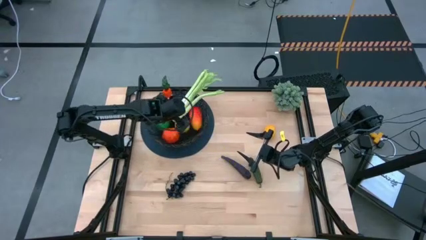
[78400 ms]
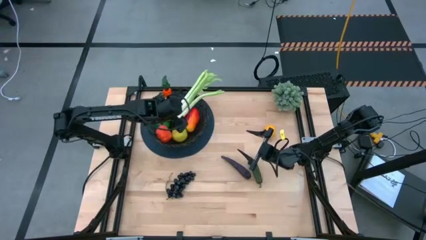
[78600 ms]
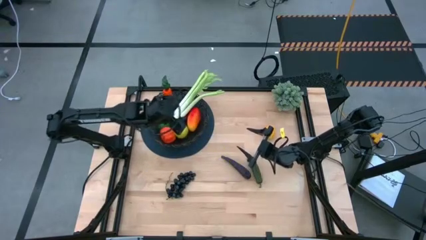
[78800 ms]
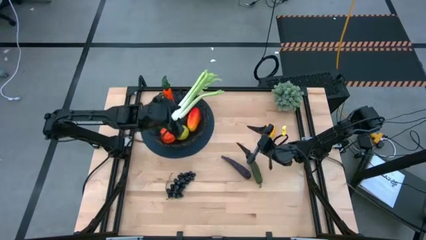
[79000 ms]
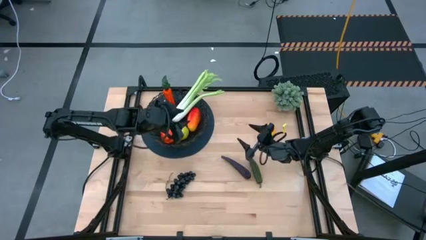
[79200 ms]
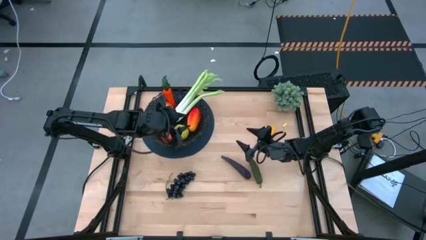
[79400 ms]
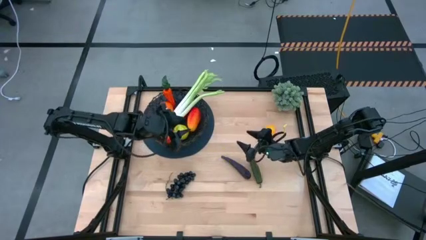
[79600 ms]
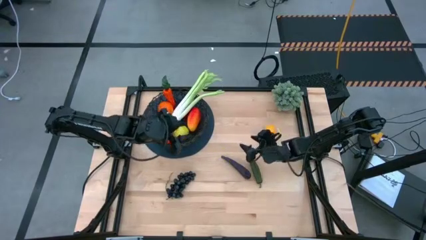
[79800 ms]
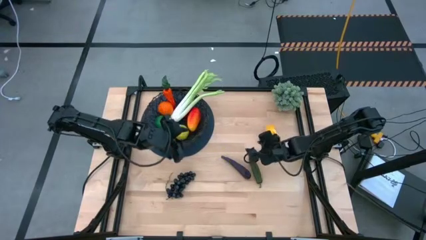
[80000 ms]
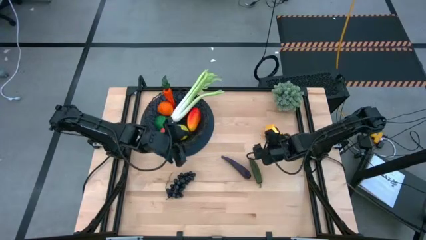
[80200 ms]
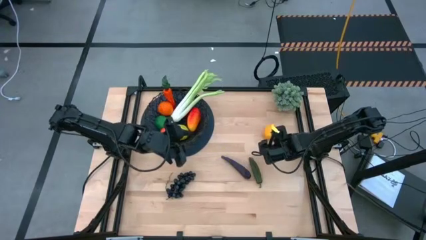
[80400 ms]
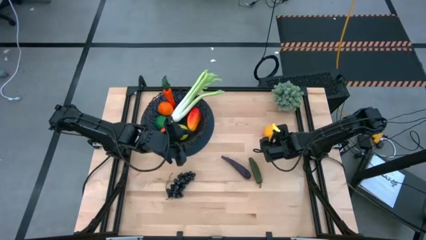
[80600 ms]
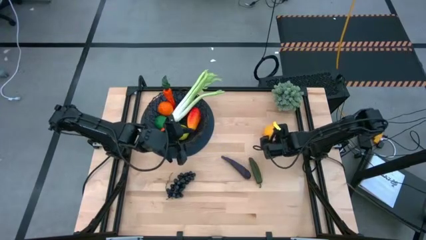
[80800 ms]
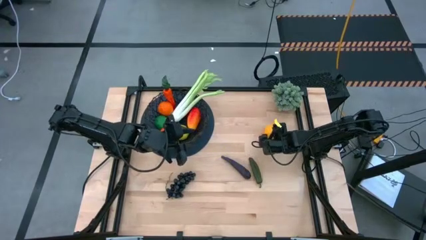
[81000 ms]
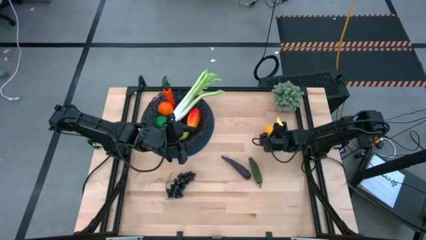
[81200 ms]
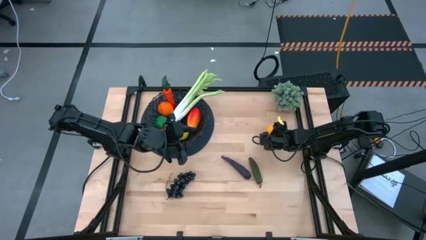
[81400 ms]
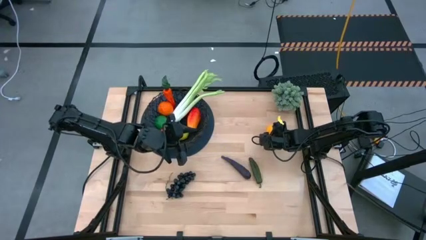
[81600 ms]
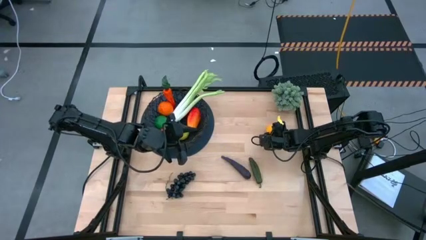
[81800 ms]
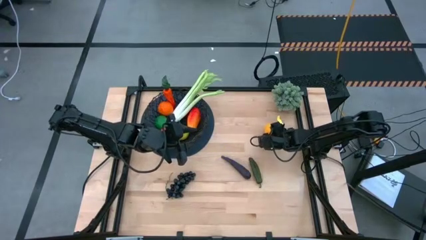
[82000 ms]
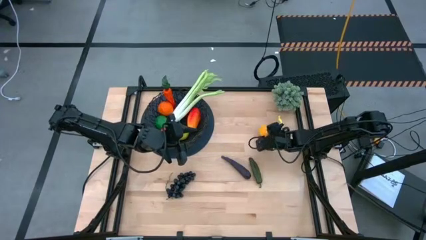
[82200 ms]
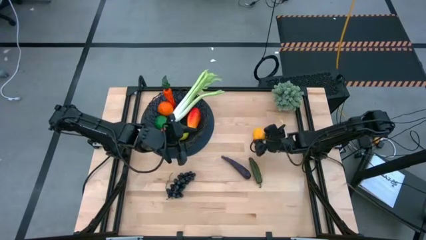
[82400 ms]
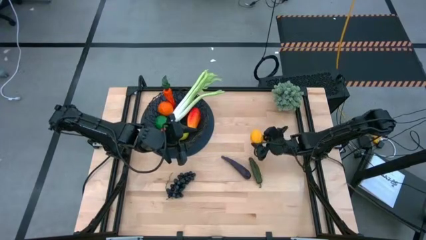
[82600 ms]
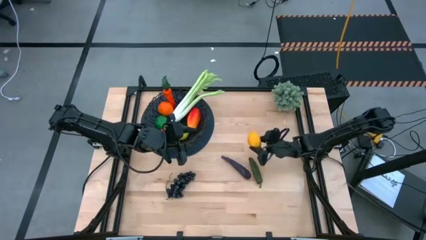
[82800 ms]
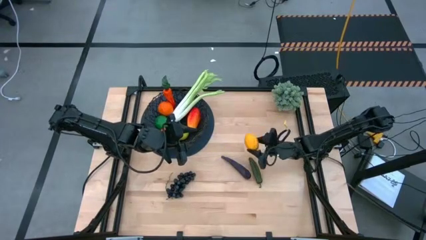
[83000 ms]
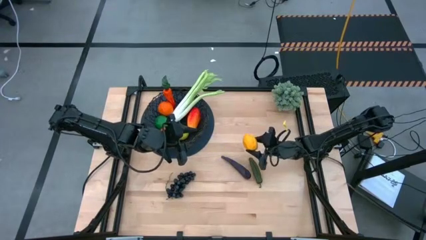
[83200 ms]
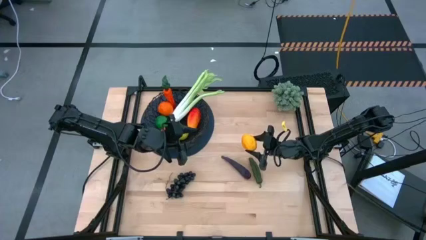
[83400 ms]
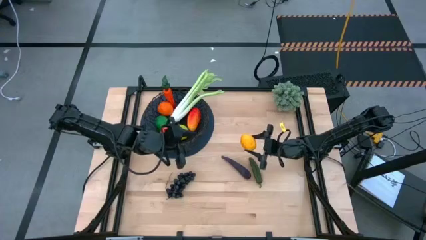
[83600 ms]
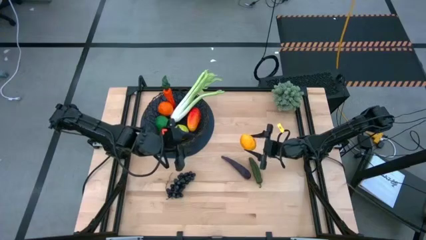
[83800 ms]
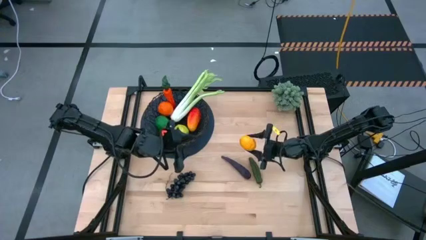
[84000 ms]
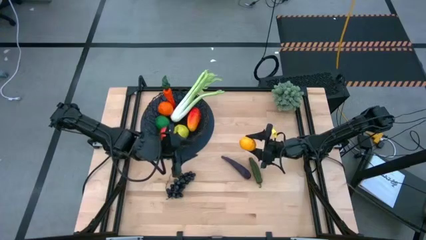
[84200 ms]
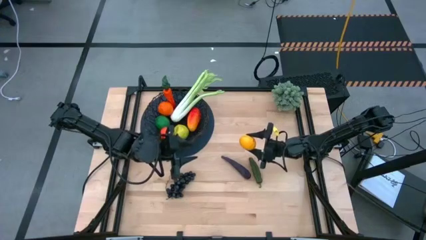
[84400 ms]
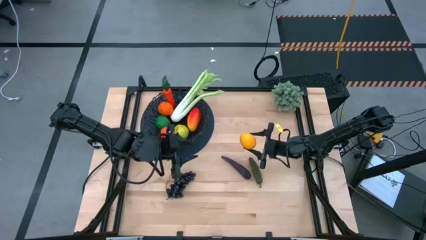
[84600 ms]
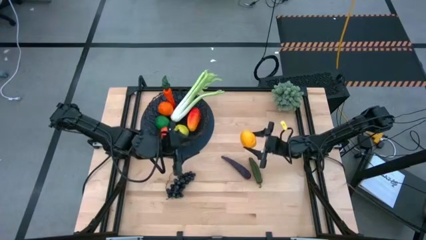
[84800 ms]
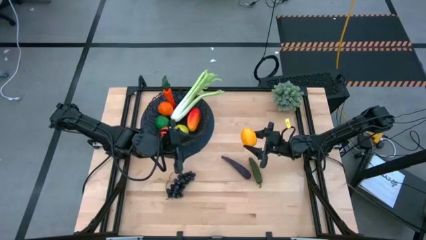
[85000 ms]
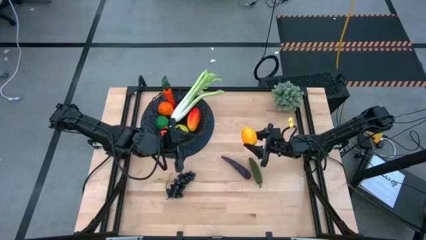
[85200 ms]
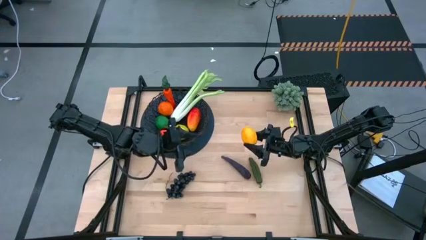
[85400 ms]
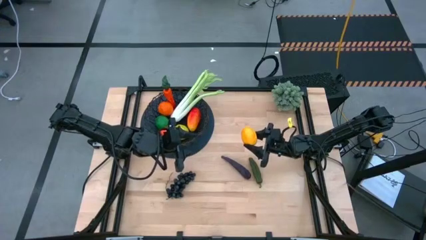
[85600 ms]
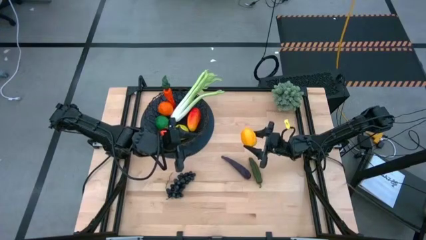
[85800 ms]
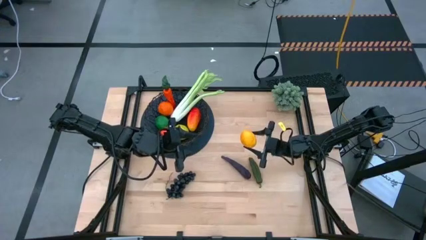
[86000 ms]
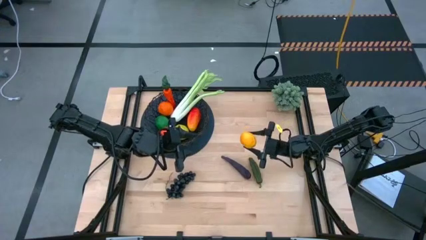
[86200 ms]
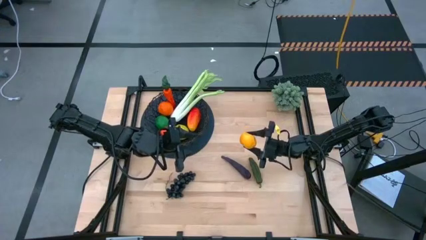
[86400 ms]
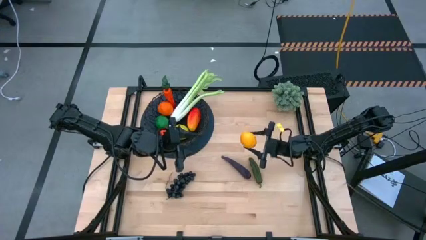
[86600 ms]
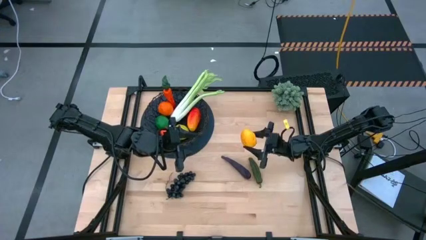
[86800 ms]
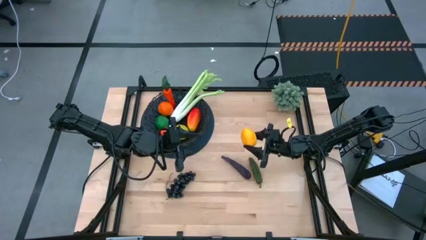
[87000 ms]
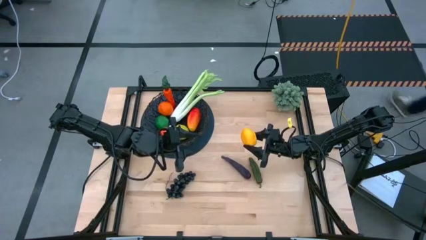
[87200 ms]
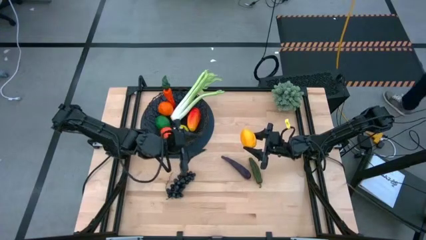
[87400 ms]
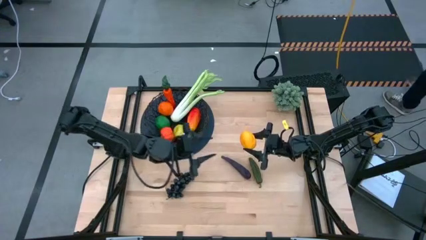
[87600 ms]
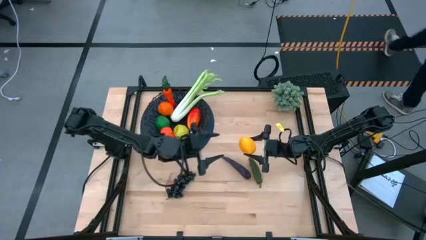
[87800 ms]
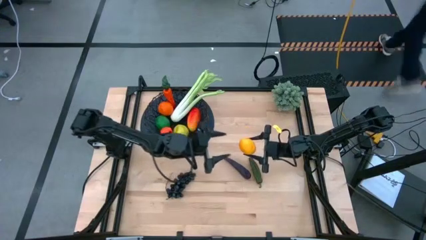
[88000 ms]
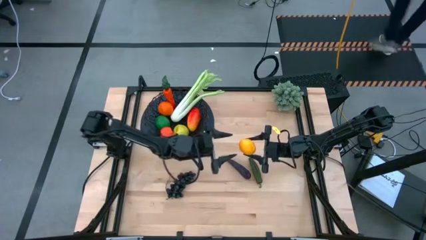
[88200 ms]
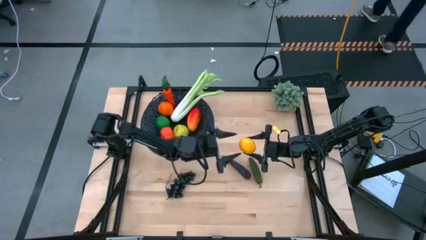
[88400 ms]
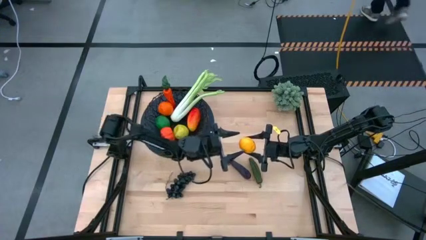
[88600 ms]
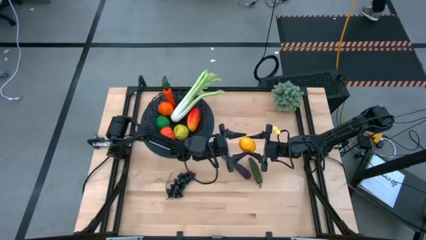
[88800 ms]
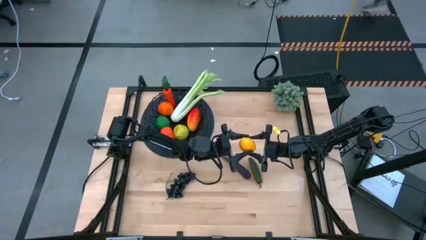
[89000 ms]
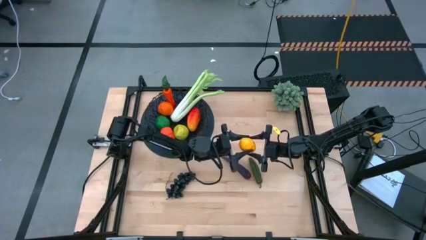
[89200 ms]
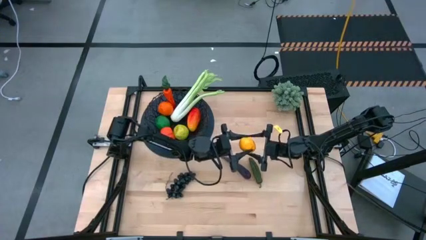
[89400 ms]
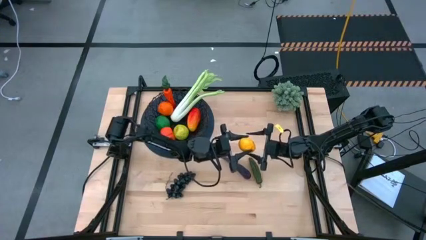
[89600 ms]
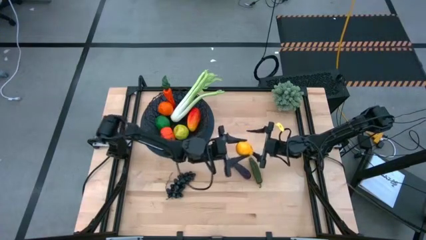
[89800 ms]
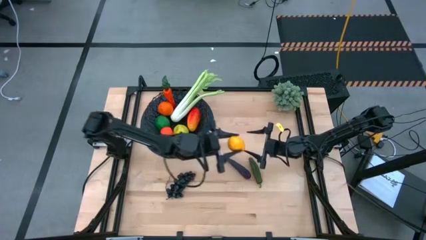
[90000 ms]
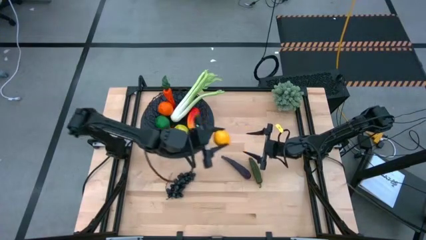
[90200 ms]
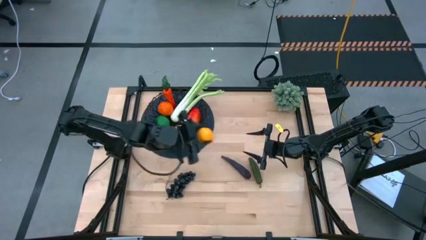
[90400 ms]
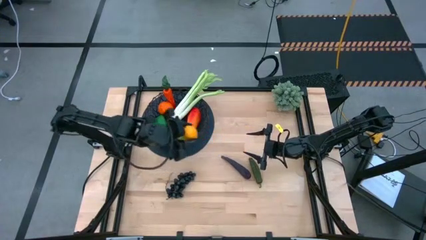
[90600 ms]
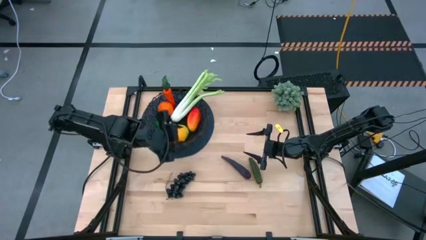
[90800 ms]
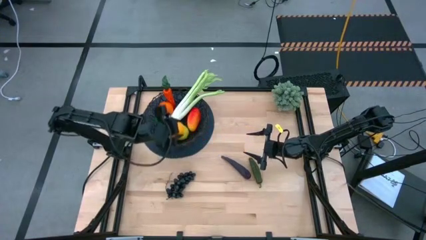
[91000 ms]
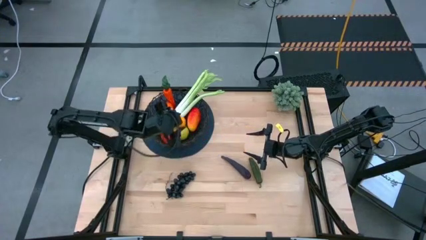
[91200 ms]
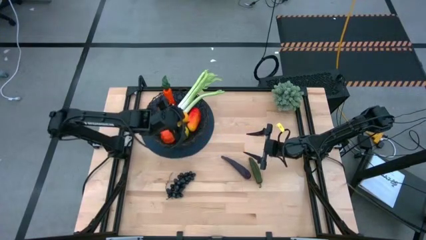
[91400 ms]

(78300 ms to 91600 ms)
Task: Build produce basket
Put the yellow lemon into the black basket

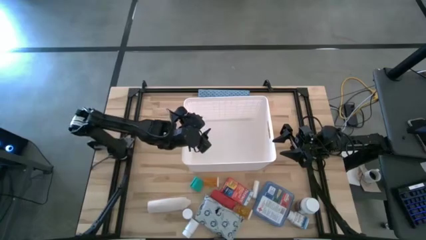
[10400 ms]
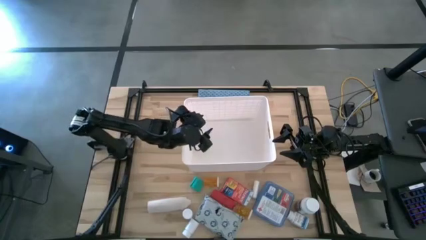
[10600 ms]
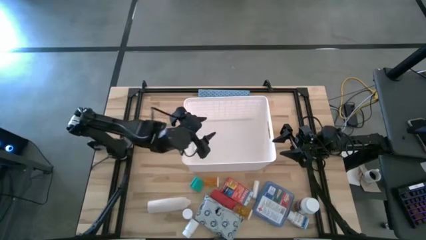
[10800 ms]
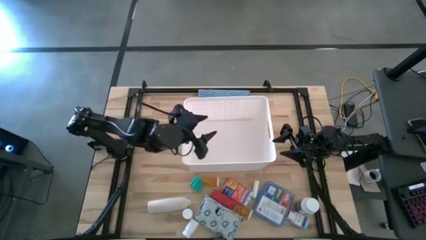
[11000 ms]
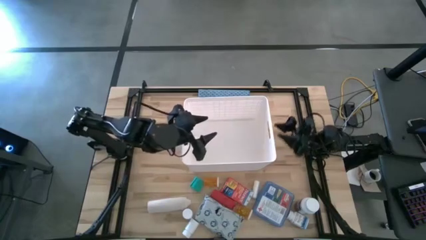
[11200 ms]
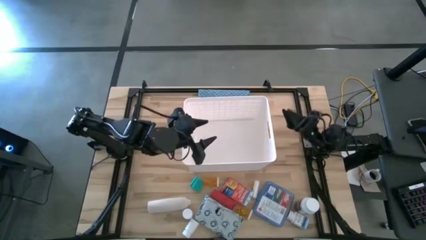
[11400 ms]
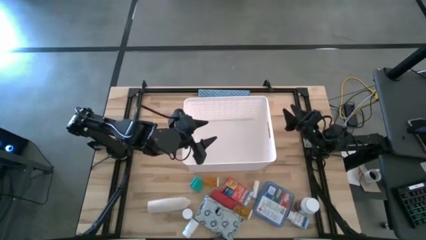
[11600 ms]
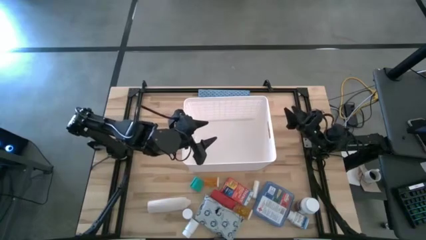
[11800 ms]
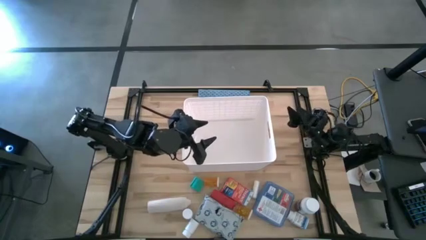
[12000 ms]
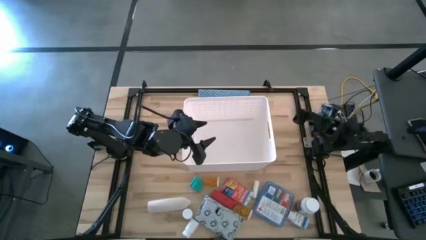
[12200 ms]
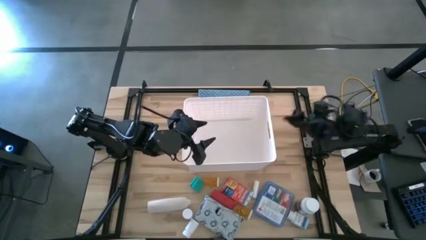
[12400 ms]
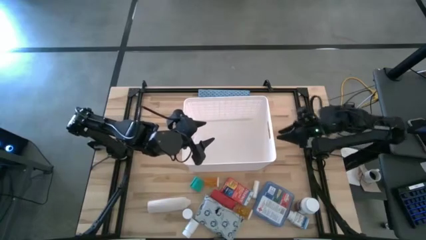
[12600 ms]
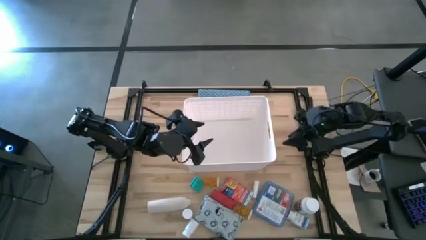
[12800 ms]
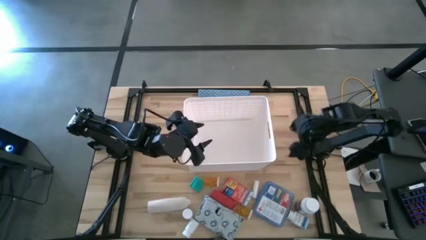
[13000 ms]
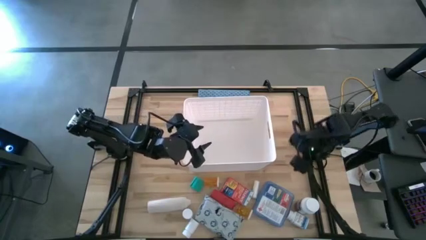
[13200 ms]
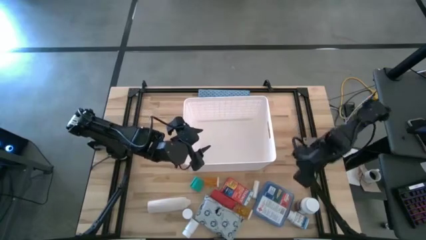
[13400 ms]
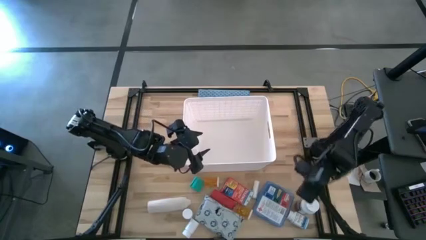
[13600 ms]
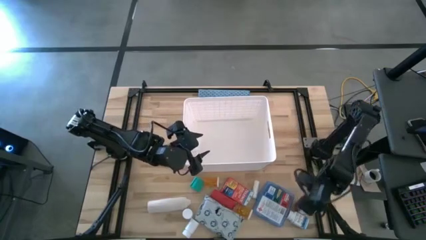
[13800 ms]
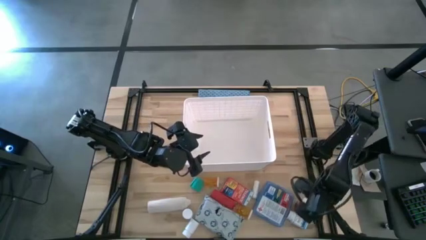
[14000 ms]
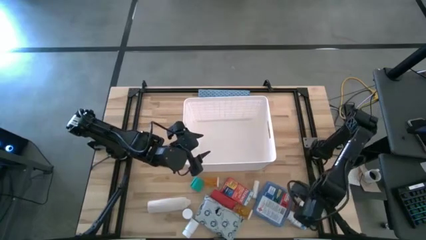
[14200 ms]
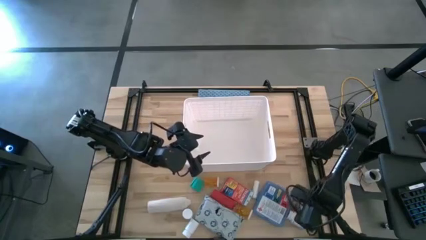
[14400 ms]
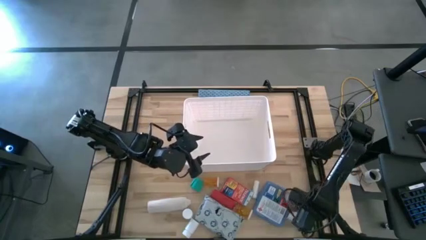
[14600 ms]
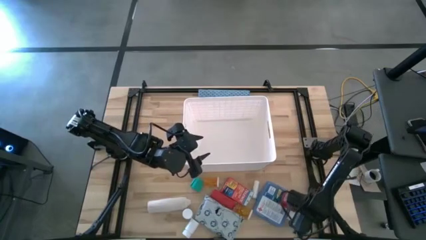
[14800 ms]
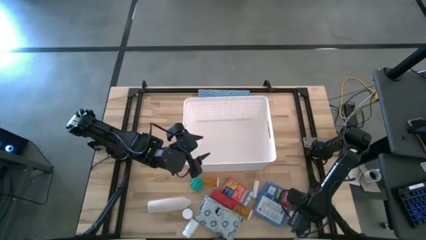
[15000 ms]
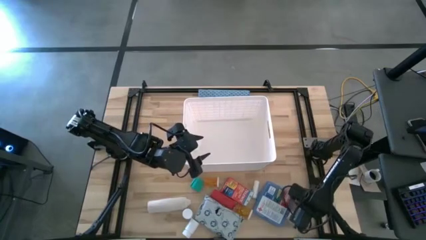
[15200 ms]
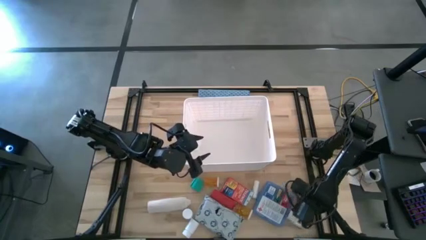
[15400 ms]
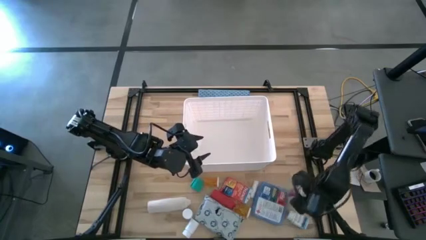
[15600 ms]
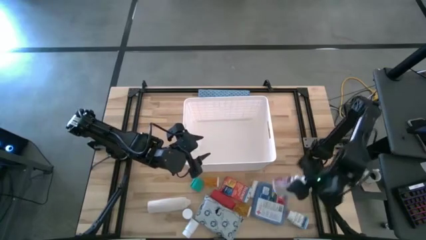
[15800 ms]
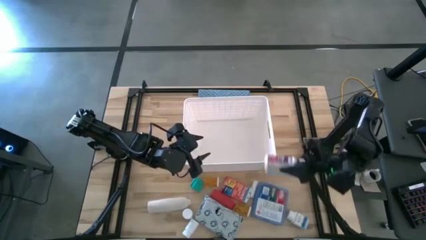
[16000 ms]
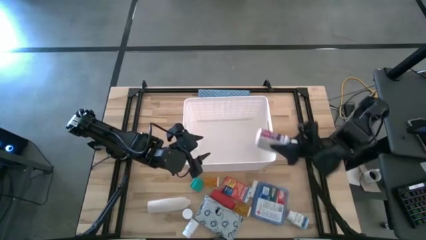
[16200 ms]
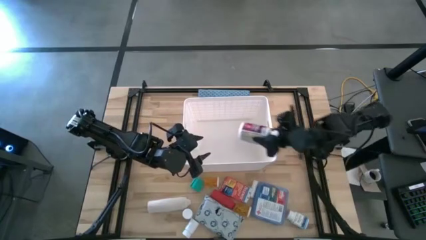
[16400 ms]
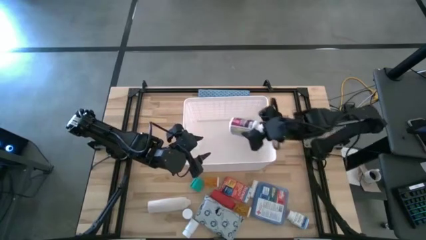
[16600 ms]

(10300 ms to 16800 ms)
Task: Pick & place medical supplies in basket/bin
Put the white and purple medicine bottle into the white bin
